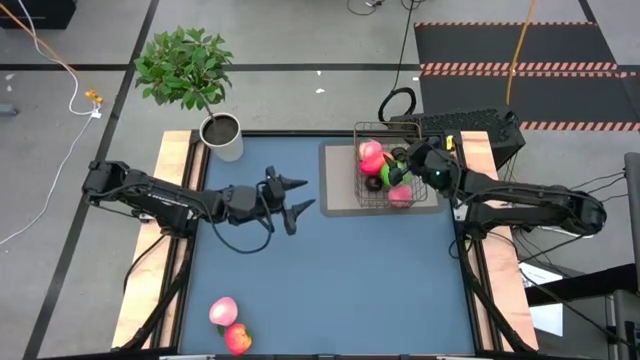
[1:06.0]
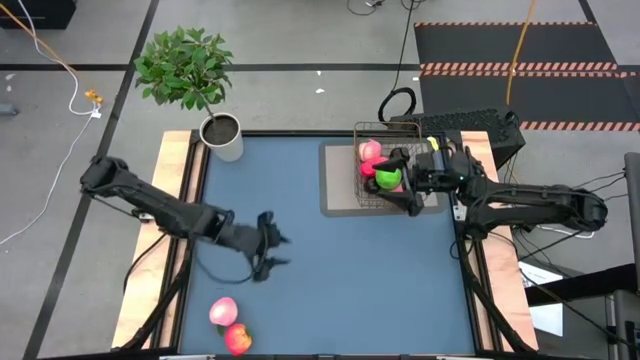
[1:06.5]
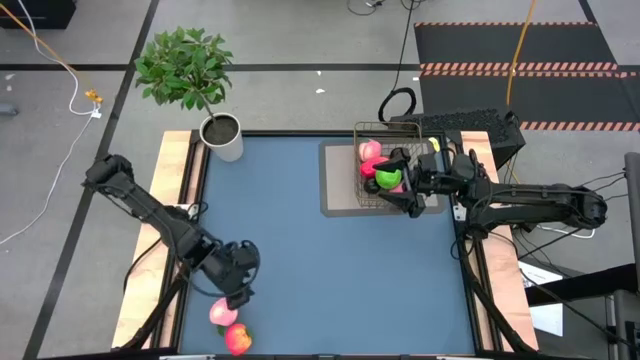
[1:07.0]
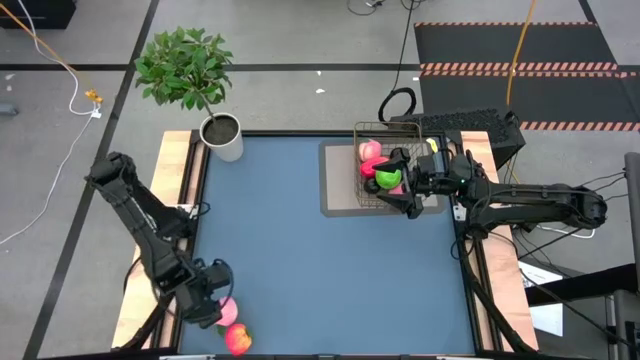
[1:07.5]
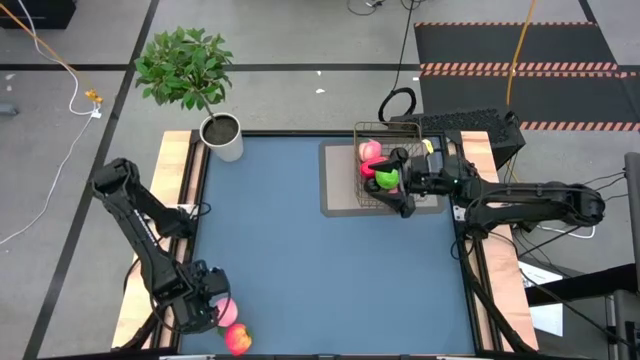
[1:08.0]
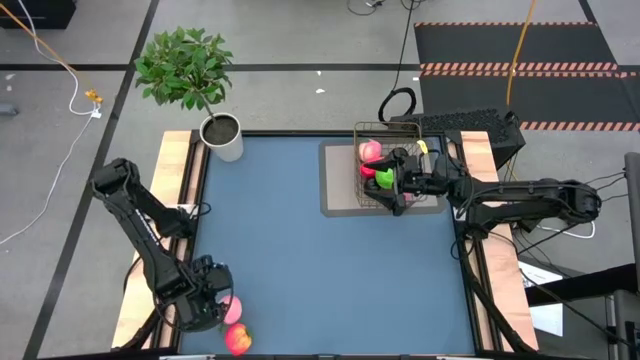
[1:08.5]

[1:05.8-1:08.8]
Task: Build produce basket
Put the pink peach into the gold wire basket

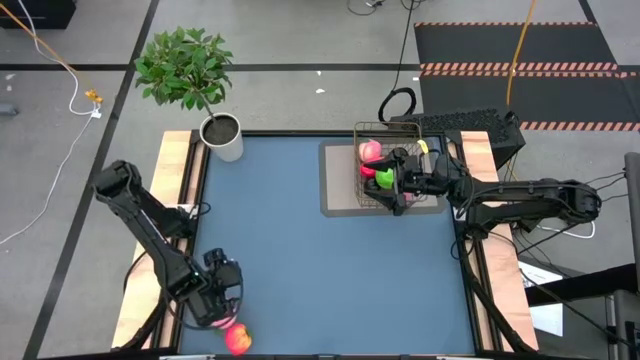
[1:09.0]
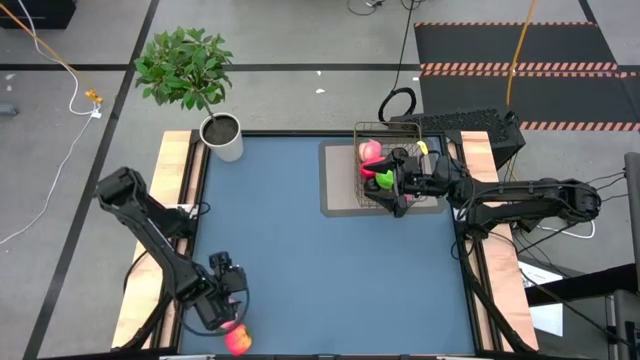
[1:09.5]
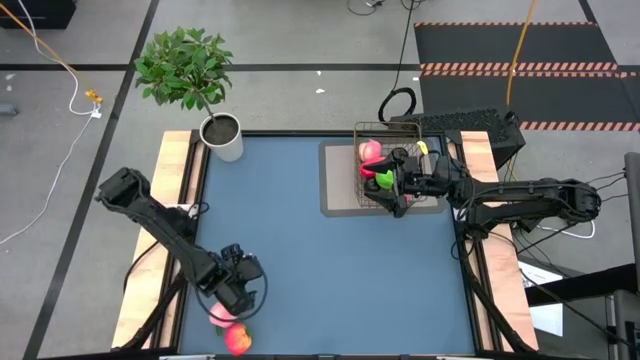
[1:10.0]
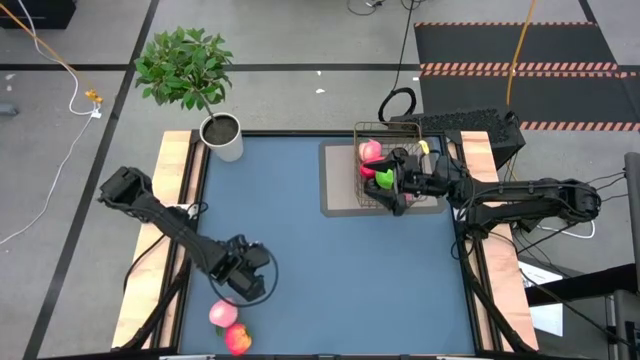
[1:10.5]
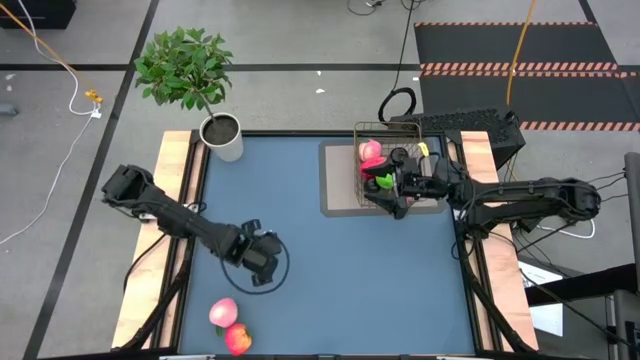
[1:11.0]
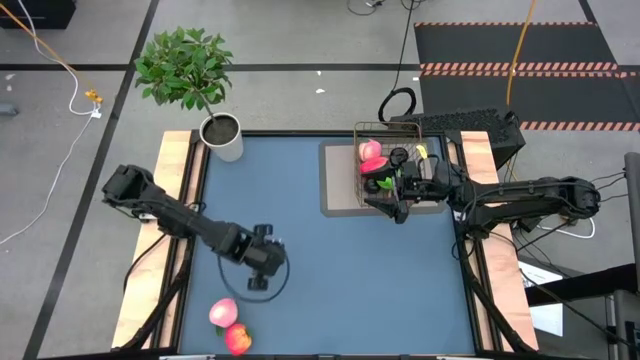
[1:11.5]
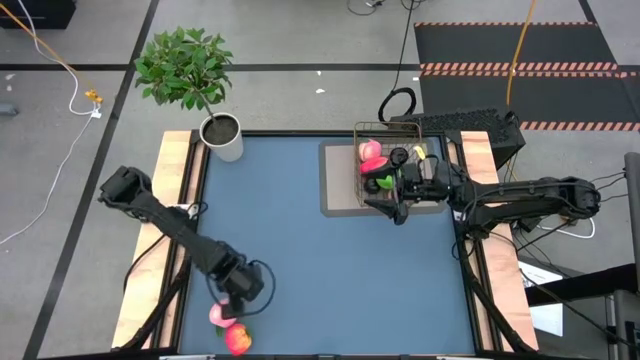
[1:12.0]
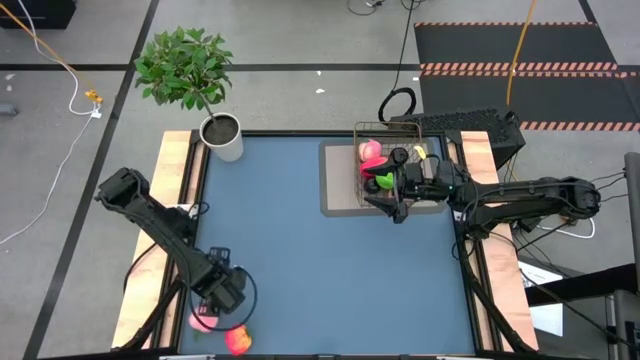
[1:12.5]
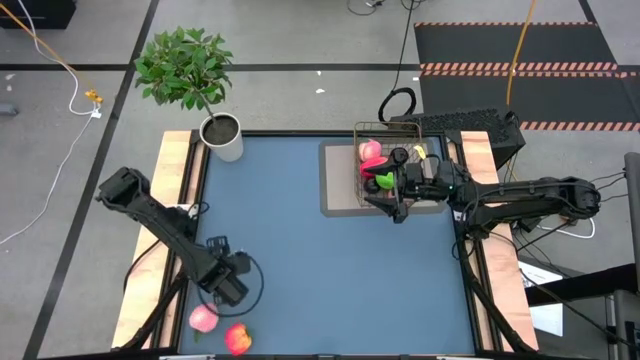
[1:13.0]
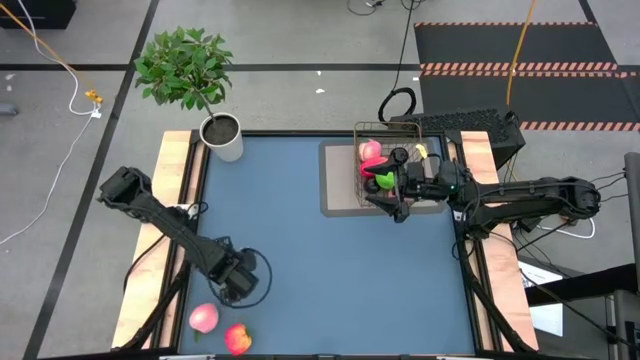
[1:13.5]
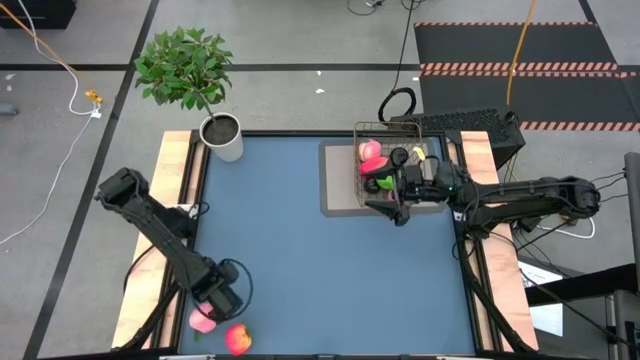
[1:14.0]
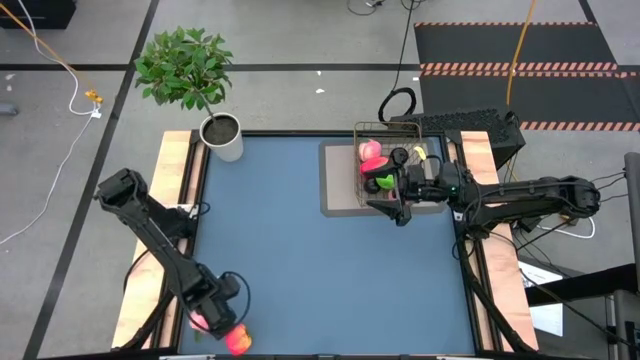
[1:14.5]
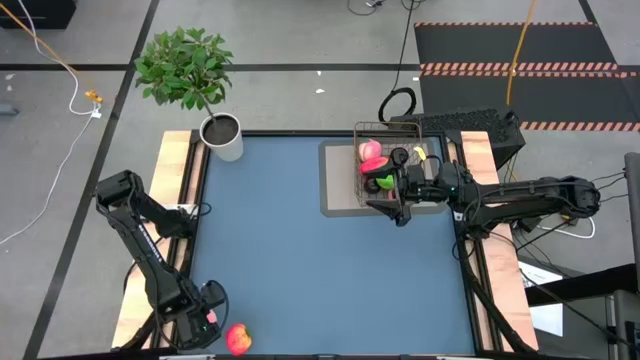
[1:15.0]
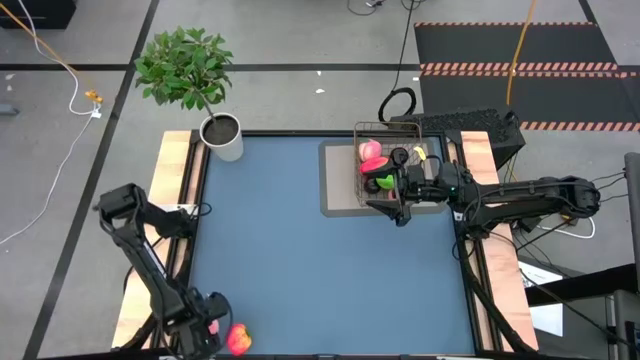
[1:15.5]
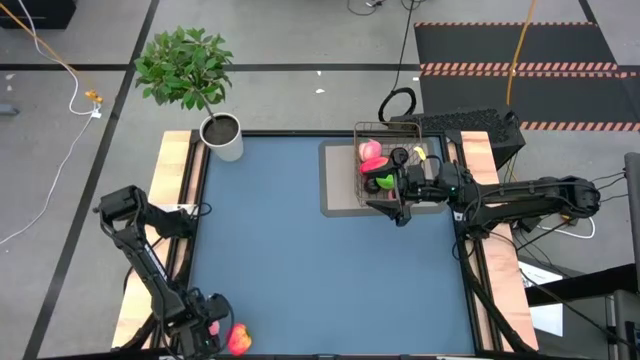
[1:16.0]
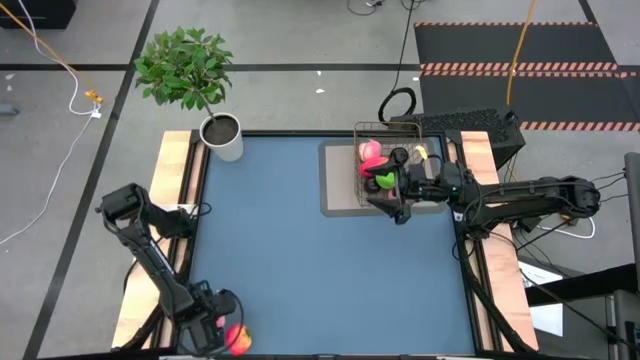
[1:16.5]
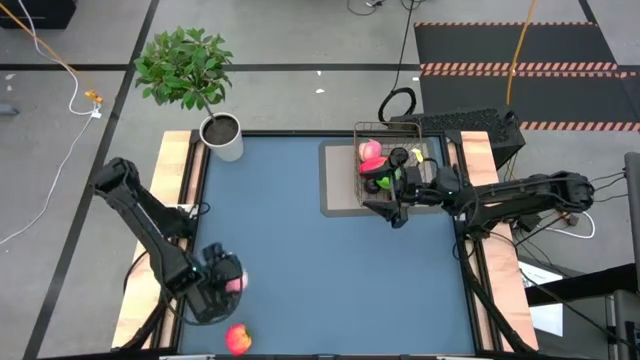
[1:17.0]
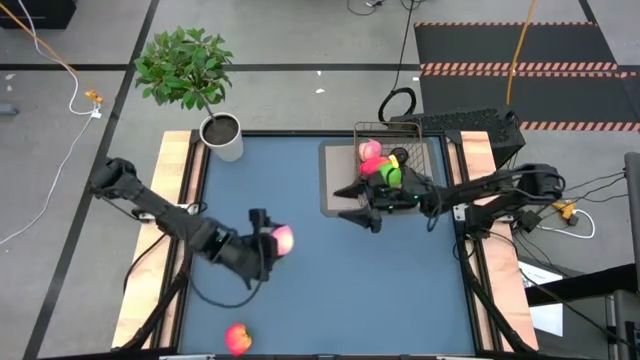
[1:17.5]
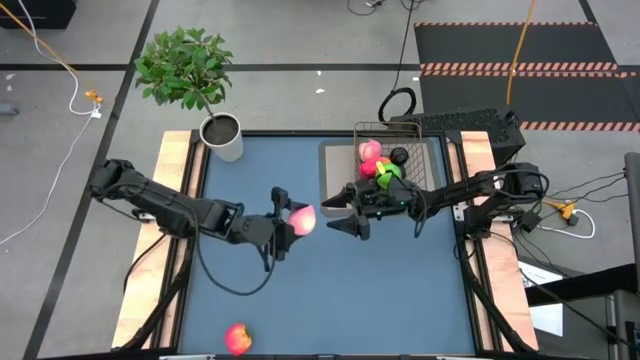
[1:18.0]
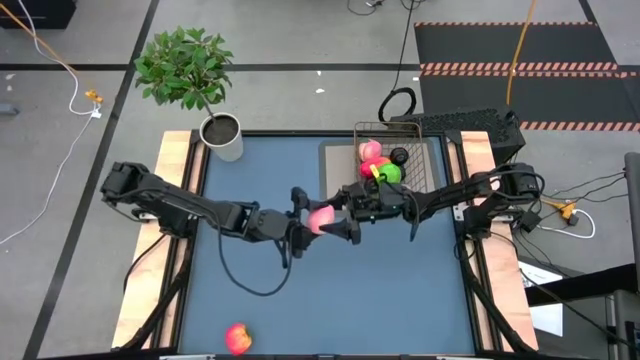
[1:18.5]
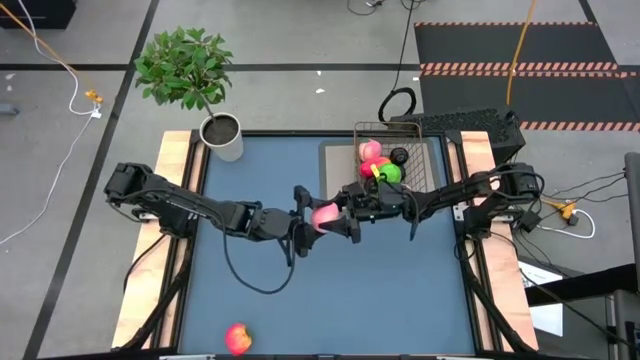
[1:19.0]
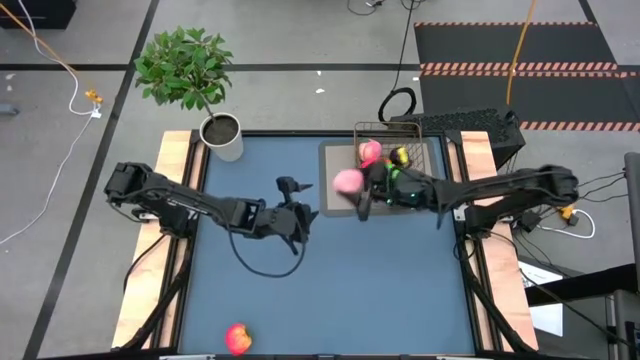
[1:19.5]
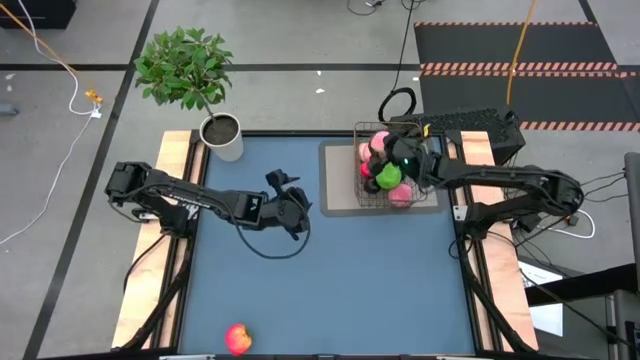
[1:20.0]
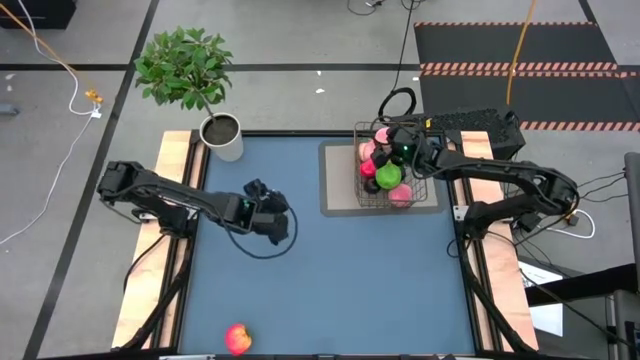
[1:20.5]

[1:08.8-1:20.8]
Put the pink peach into the gold wire basket

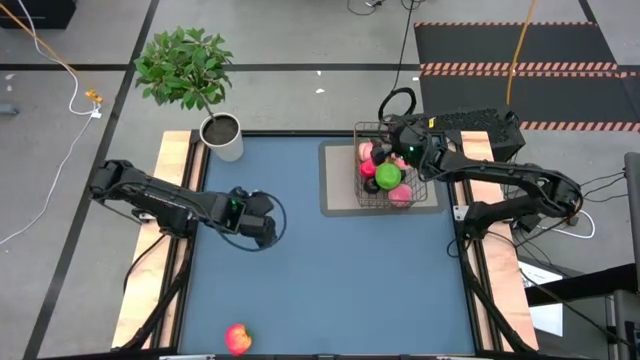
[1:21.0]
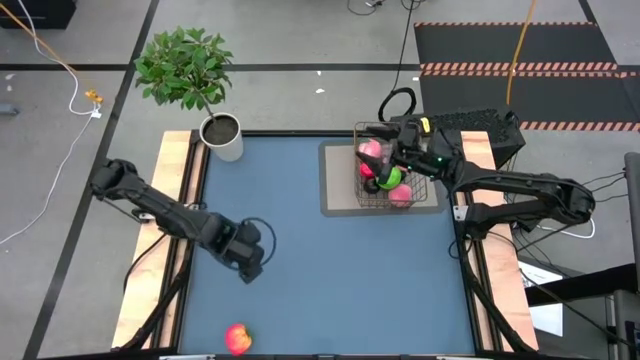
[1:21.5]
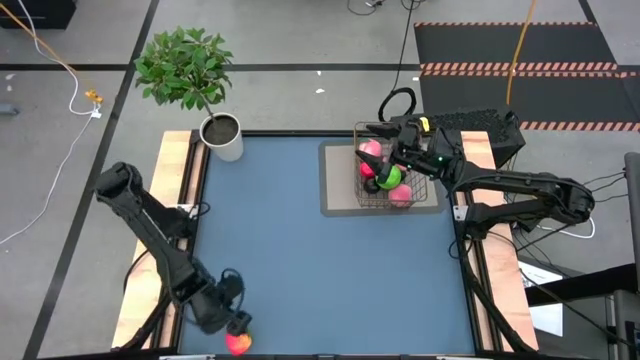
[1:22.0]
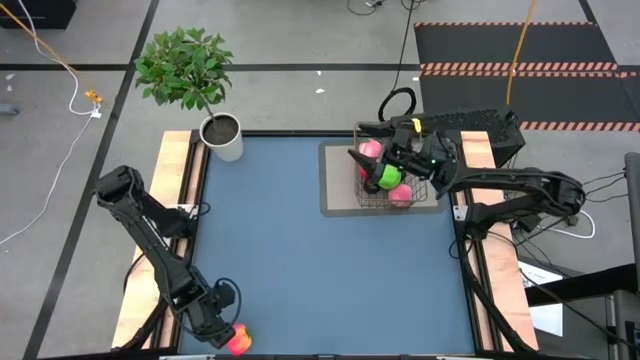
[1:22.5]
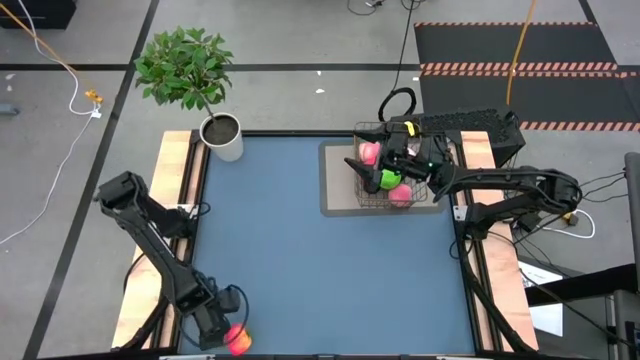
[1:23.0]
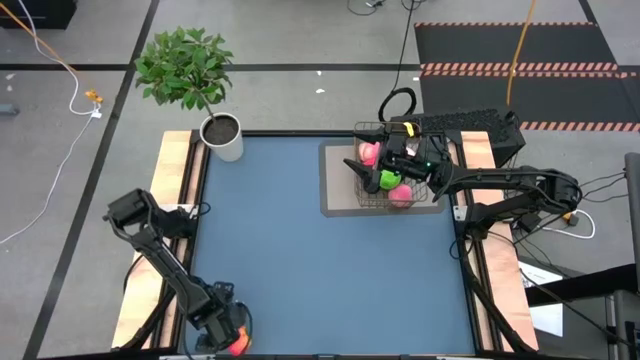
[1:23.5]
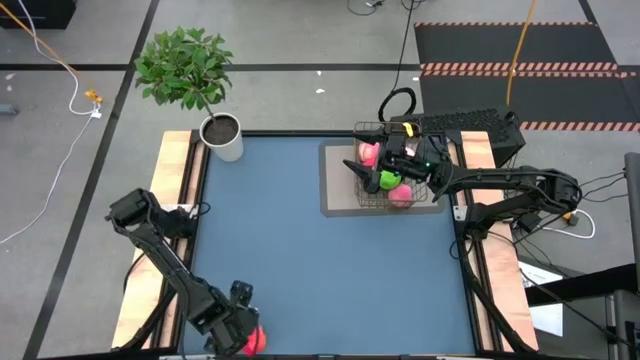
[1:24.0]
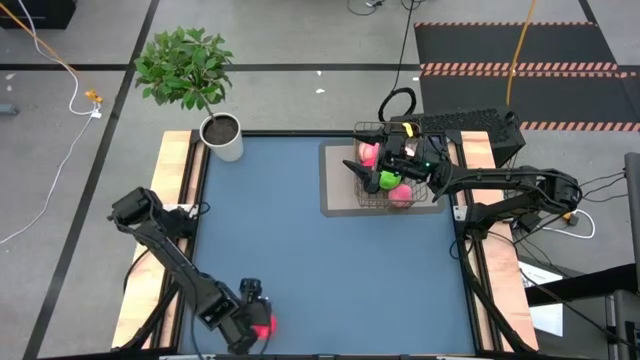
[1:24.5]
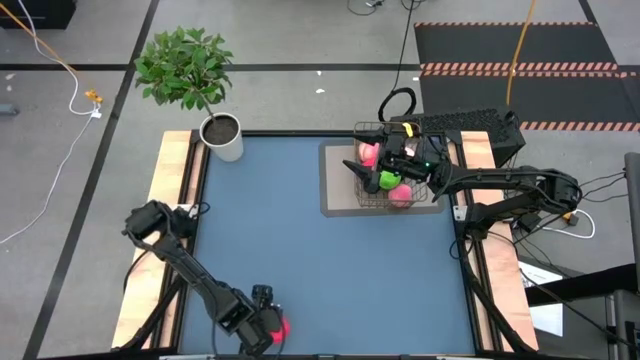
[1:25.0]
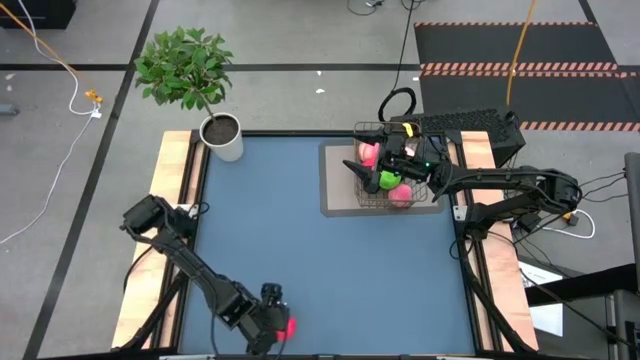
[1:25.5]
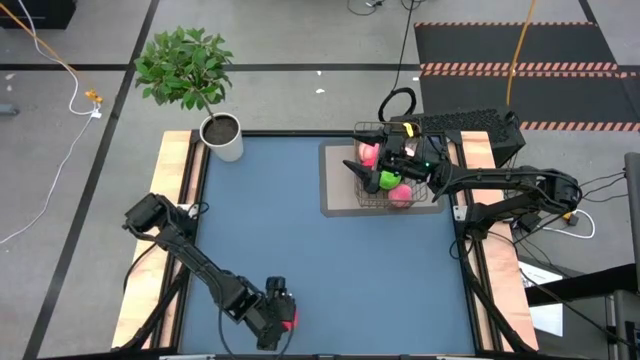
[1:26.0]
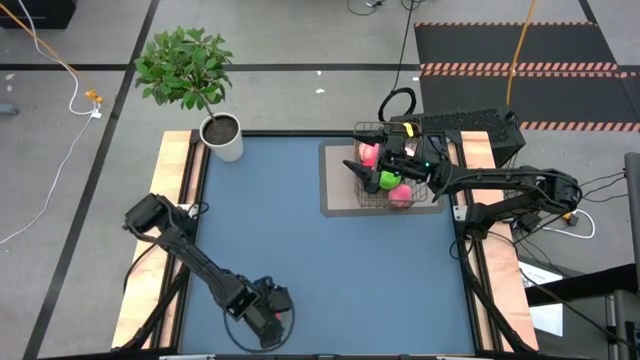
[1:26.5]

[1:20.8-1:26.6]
Put the orange tomato into the gold wire basket
